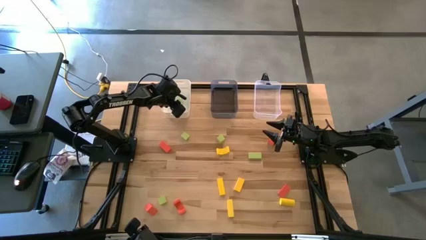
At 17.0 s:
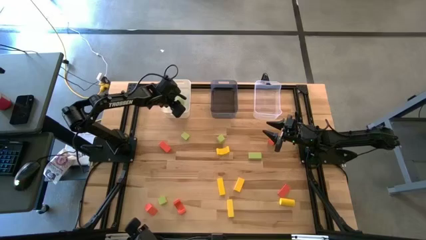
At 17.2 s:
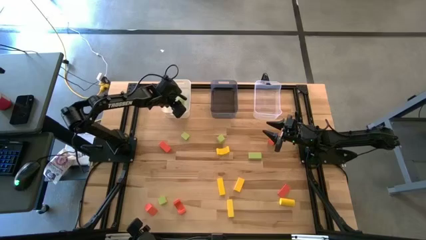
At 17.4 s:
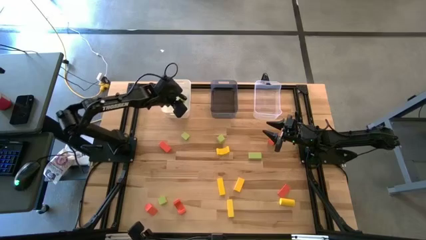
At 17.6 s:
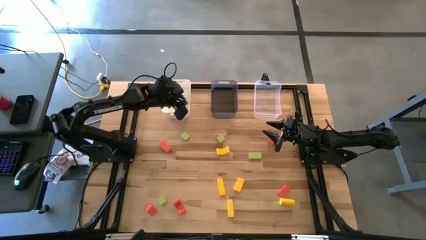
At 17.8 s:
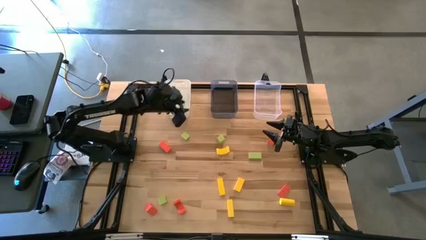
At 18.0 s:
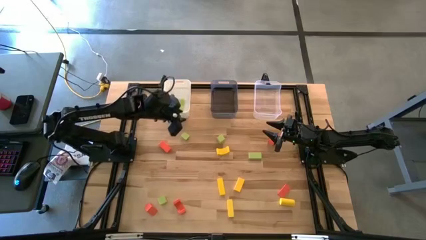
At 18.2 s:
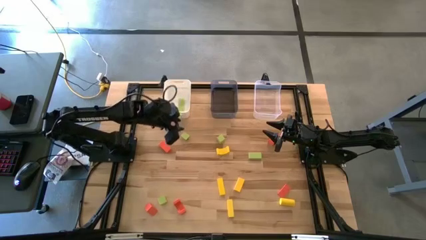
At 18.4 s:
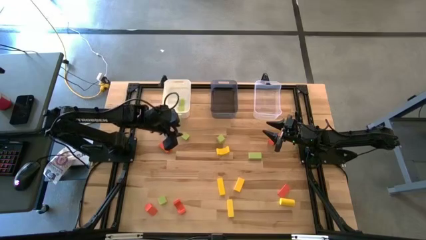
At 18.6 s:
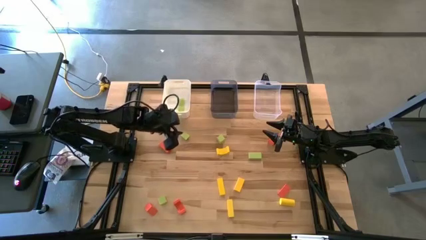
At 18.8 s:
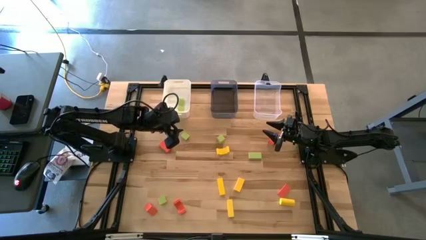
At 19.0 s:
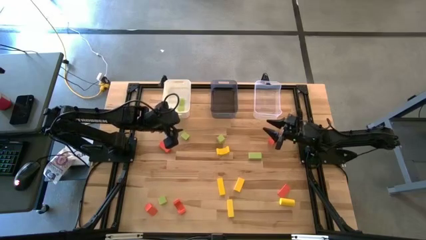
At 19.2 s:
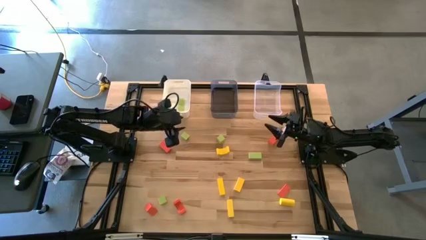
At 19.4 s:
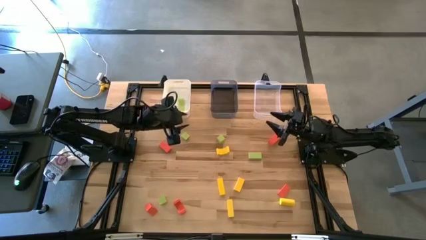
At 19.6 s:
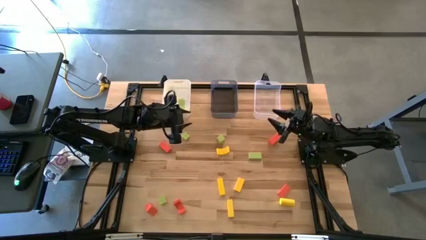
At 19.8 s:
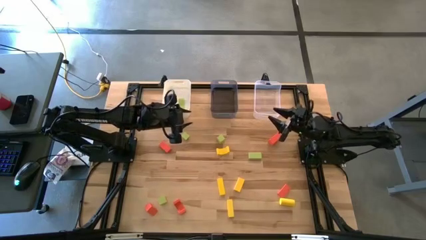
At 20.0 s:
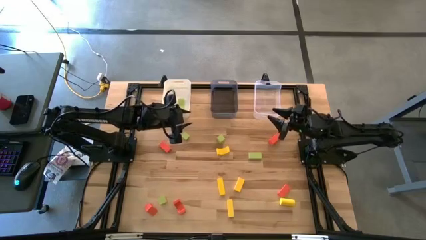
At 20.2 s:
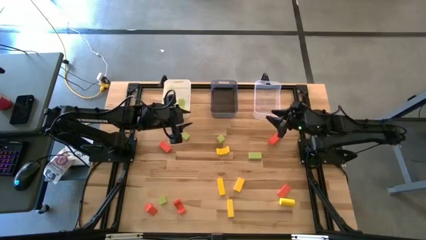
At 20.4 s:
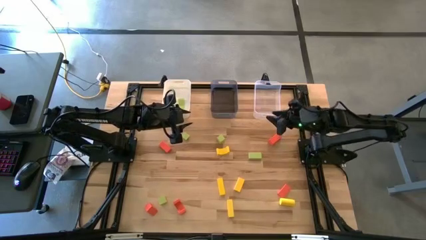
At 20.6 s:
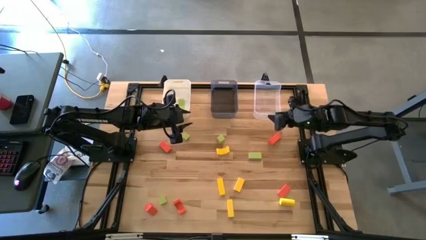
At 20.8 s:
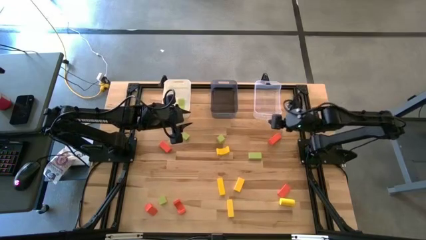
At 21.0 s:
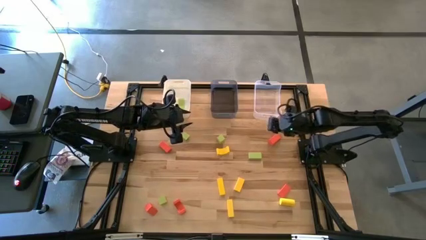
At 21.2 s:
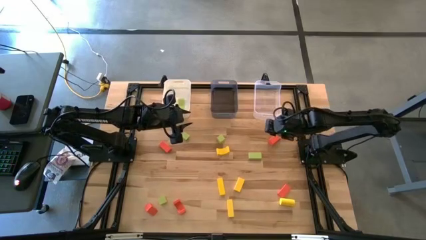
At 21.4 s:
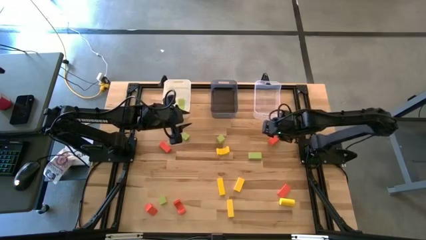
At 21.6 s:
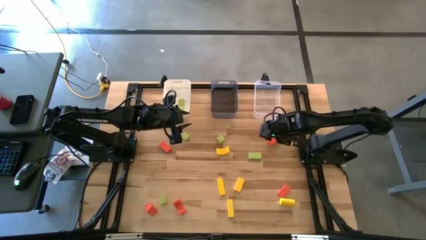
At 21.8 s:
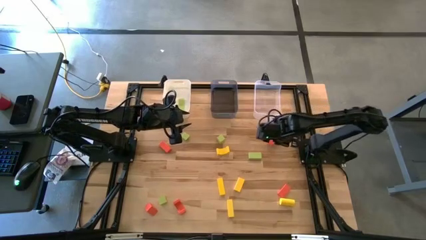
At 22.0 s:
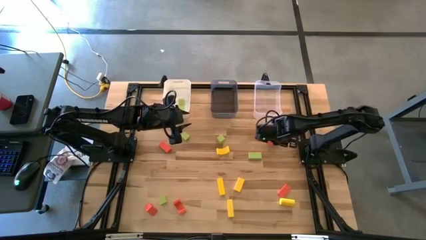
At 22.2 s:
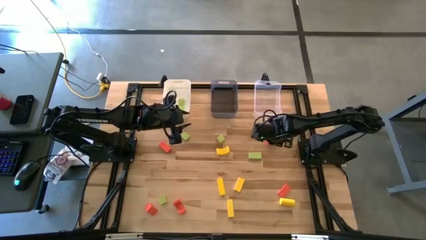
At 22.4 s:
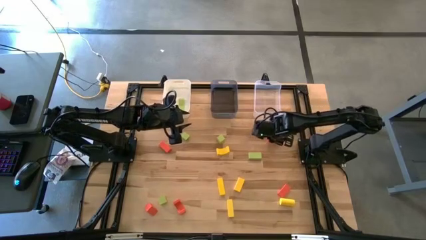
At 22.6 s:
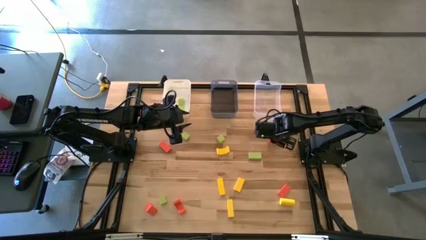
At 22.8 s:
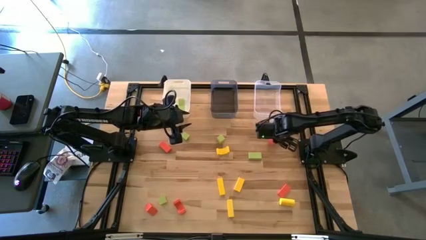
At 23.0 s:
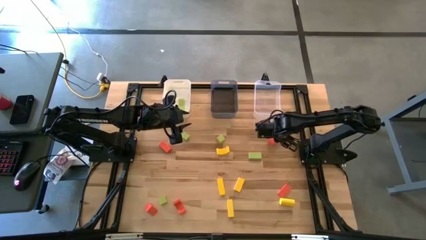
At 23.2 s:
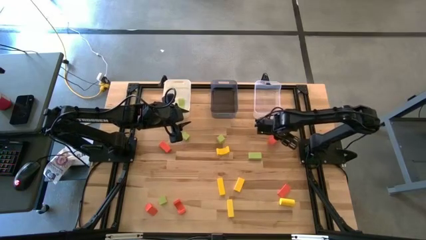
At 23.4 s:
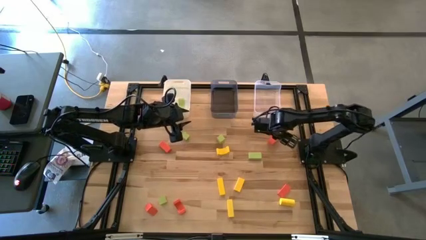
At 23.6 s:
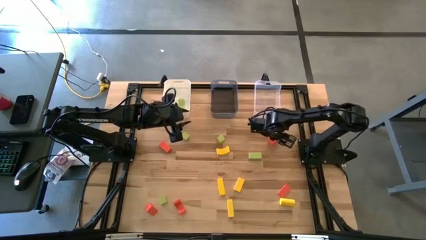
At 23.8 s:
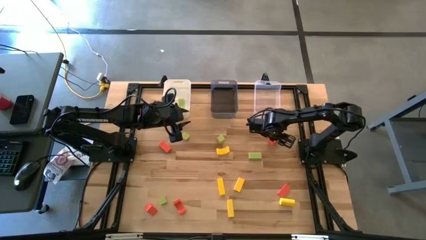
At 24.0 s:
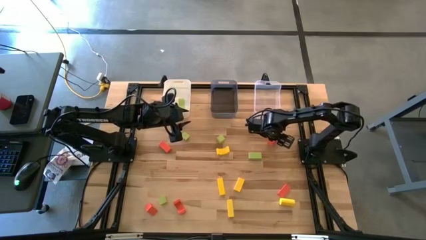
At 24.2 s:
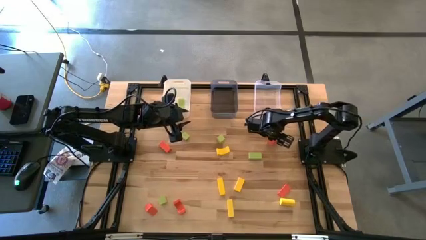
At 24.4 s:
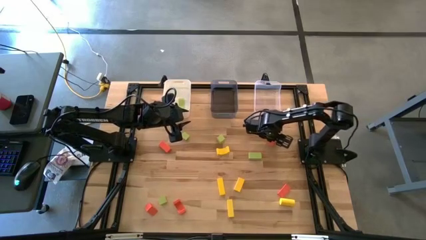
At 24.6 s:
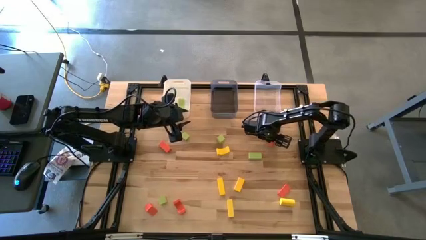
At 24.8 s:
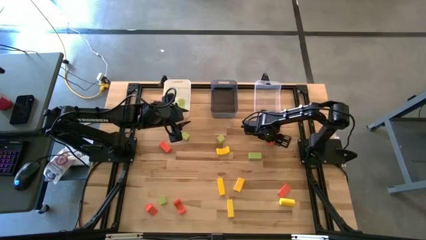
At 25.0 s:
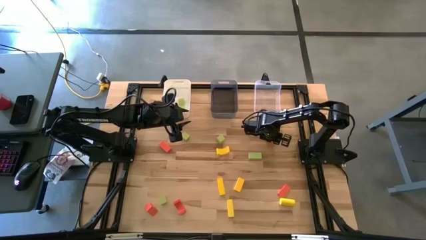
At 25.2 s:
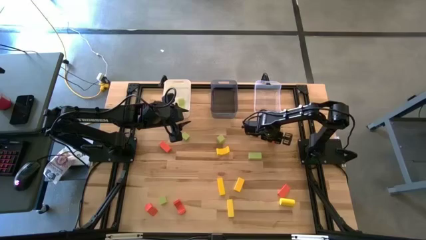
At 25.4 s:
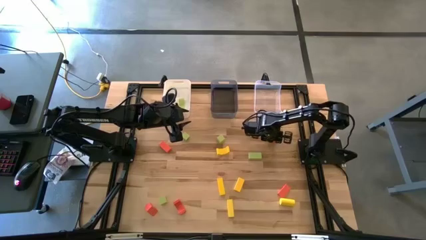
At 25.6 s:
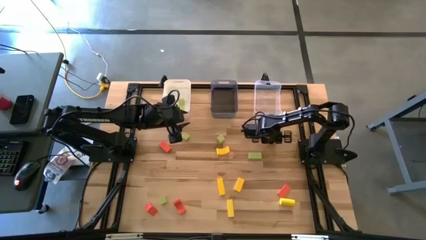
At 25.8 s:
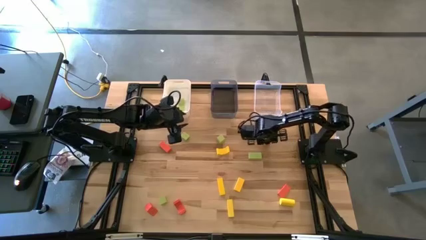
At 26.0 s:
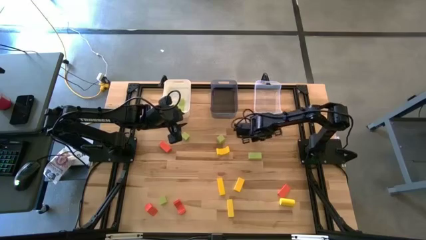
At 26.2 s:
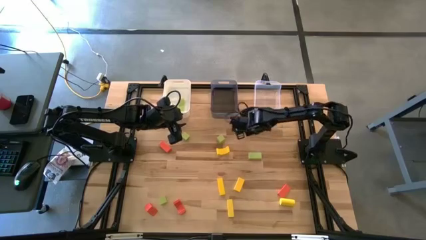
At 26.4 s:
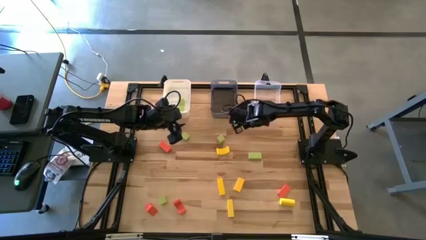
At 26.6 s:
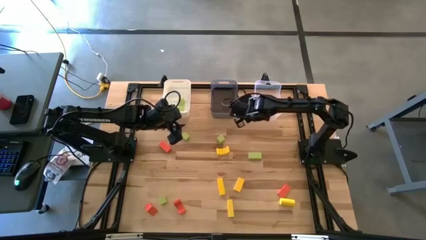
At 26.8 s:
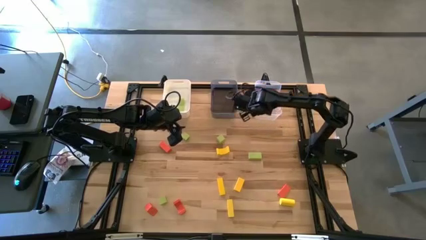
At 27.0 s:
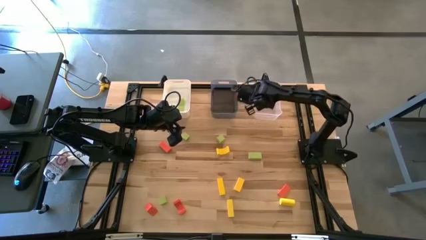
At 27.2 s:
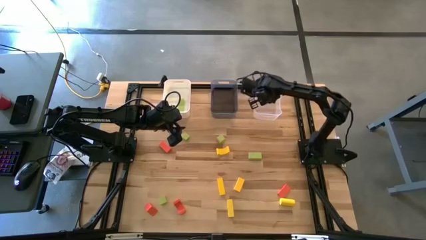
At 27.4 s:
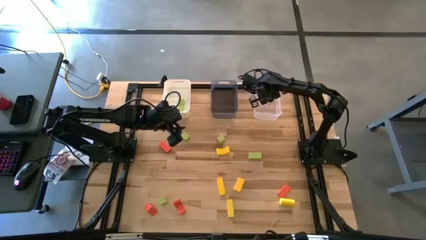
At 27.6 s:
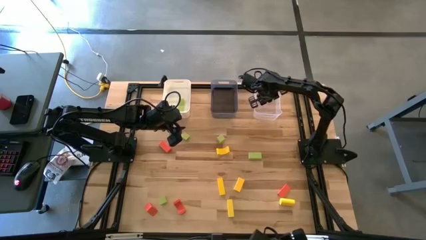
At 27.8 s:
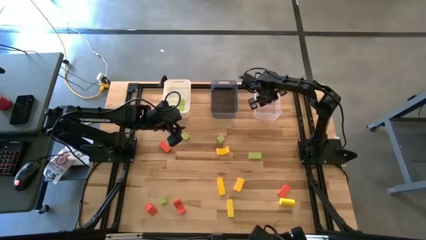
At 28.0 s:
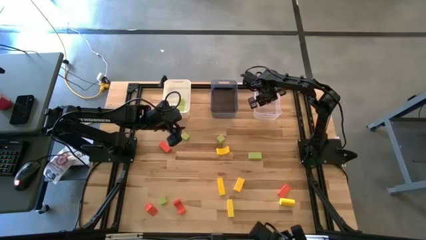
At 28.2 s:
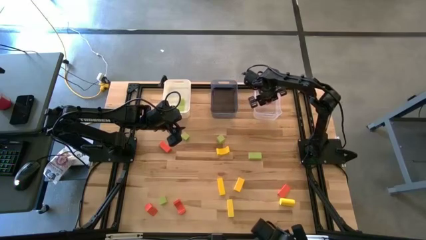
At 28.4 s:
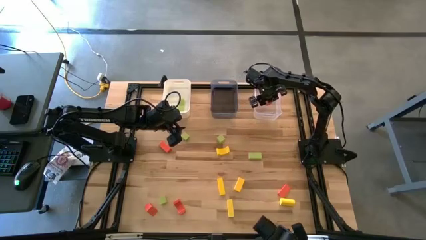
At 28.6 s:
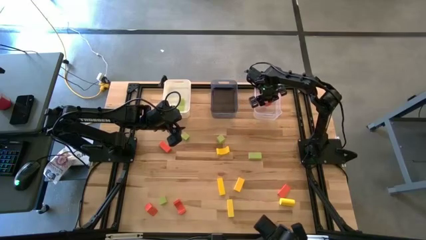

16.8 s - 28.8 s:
Task: Sort & place blocks by color
Put the orange block into the transparent bin
